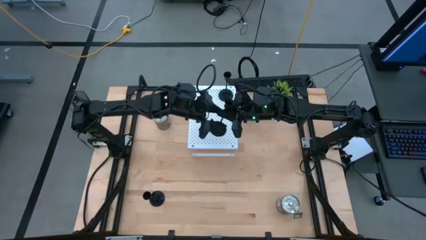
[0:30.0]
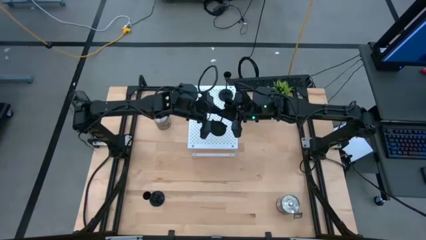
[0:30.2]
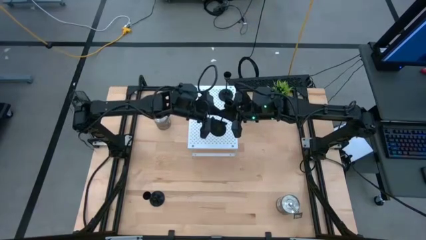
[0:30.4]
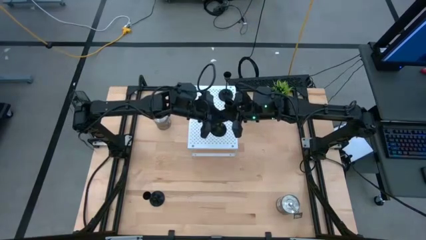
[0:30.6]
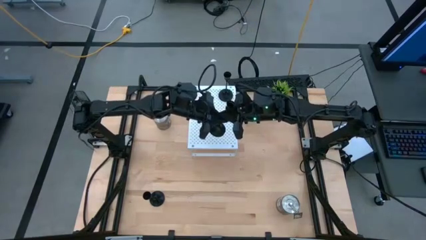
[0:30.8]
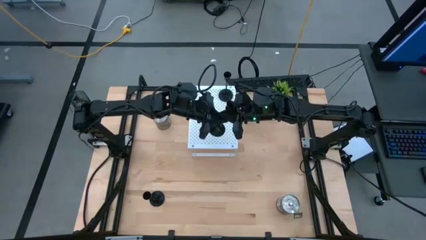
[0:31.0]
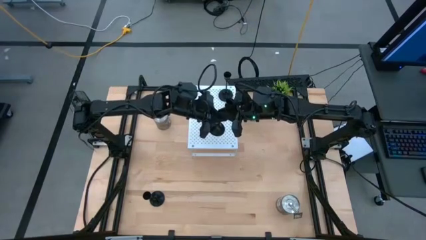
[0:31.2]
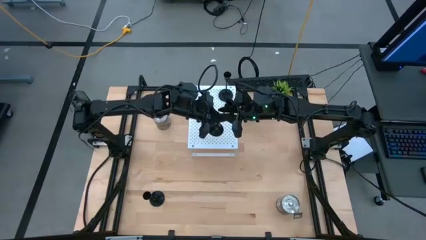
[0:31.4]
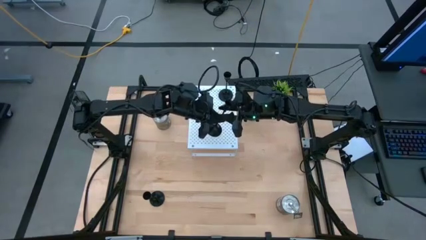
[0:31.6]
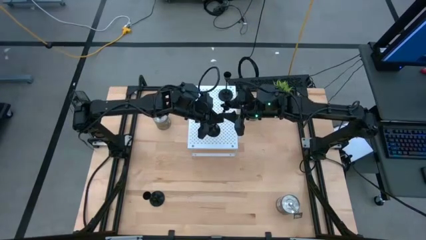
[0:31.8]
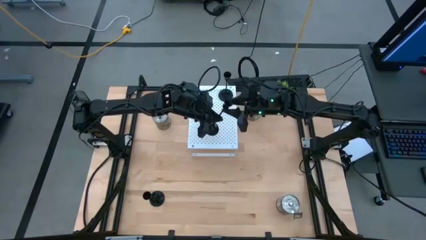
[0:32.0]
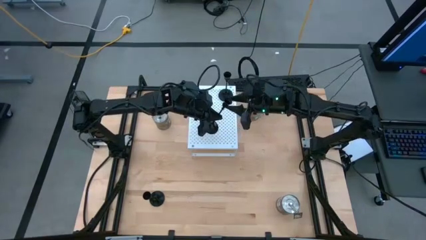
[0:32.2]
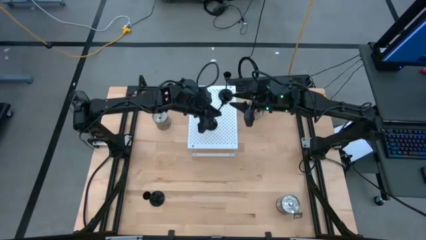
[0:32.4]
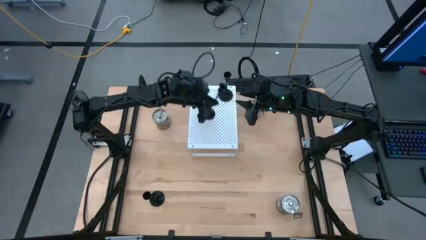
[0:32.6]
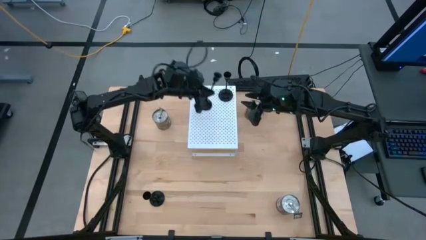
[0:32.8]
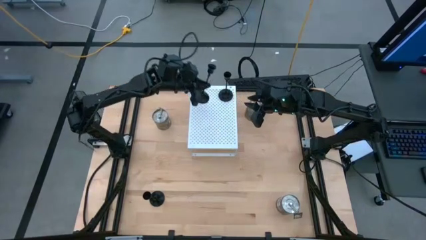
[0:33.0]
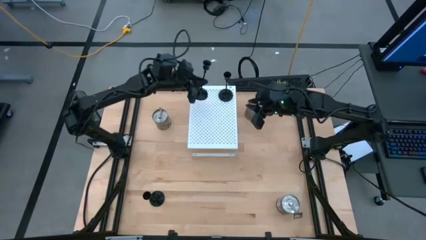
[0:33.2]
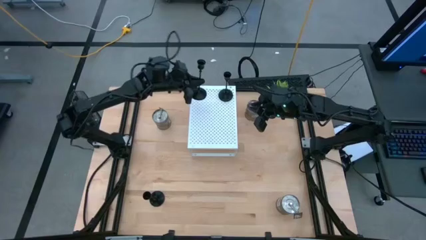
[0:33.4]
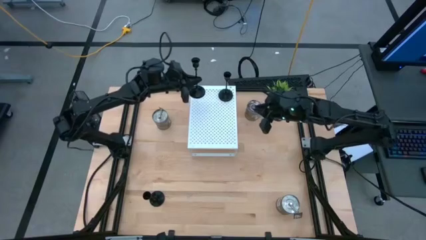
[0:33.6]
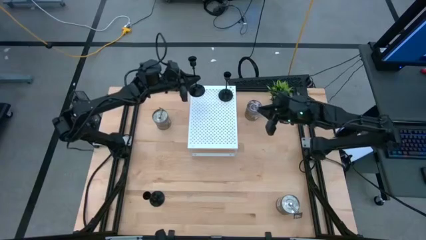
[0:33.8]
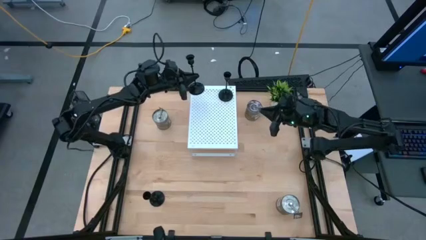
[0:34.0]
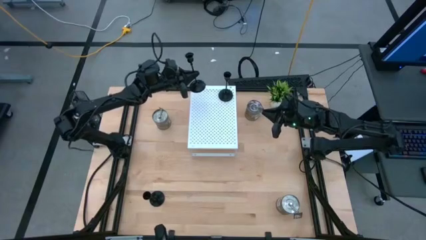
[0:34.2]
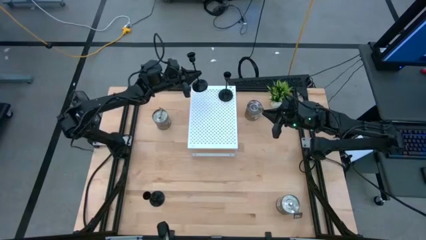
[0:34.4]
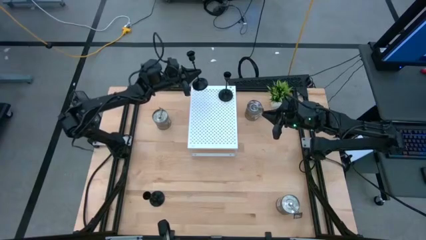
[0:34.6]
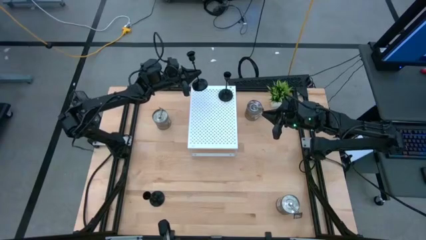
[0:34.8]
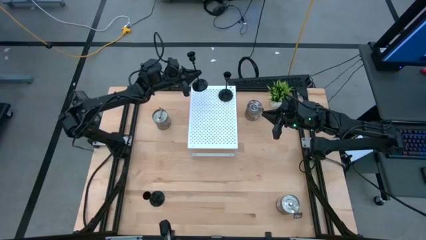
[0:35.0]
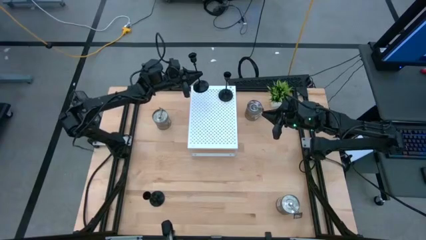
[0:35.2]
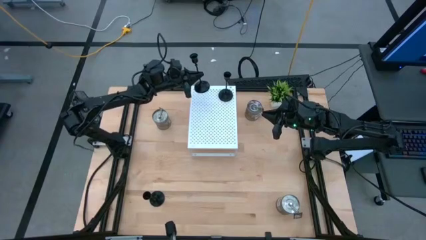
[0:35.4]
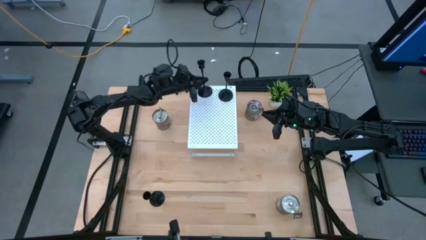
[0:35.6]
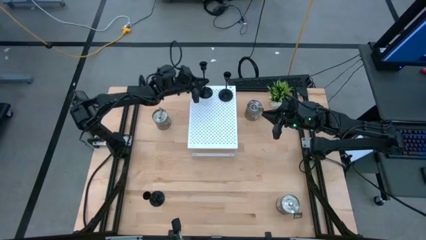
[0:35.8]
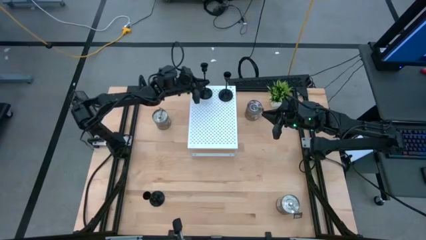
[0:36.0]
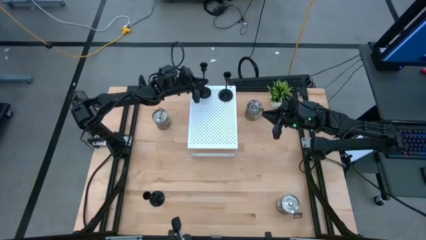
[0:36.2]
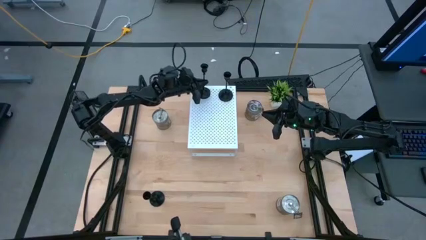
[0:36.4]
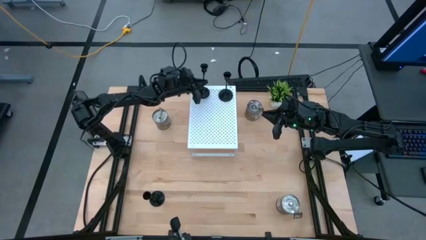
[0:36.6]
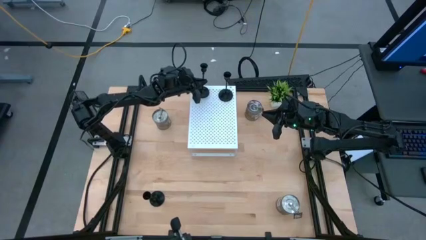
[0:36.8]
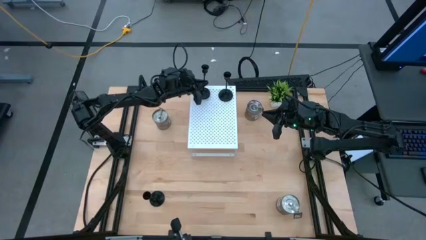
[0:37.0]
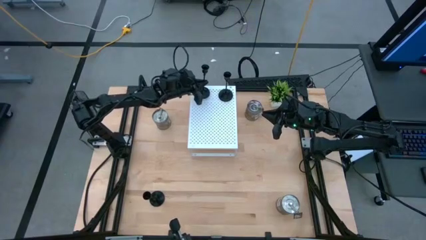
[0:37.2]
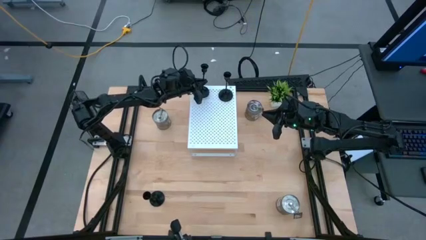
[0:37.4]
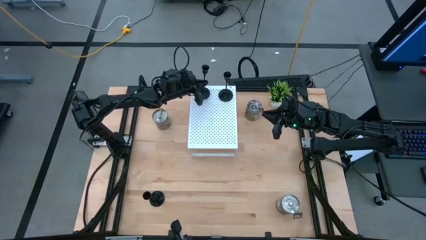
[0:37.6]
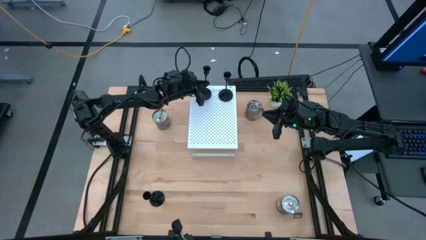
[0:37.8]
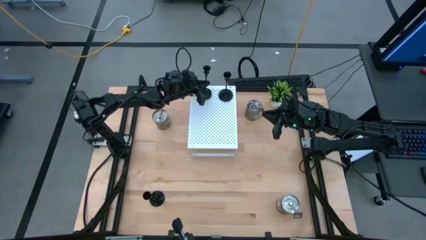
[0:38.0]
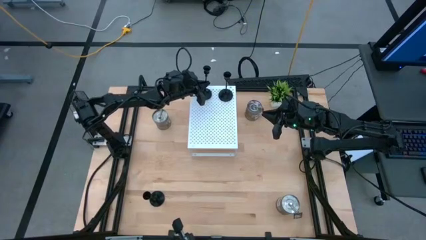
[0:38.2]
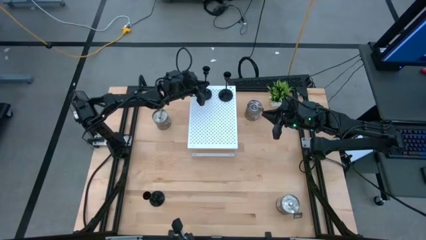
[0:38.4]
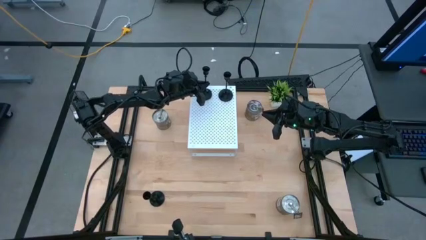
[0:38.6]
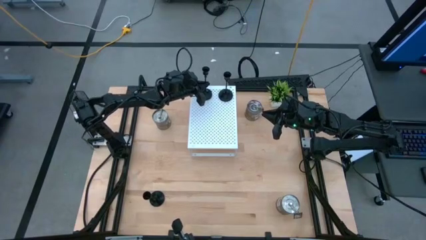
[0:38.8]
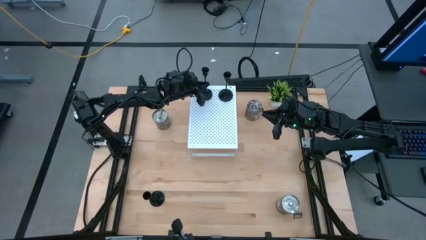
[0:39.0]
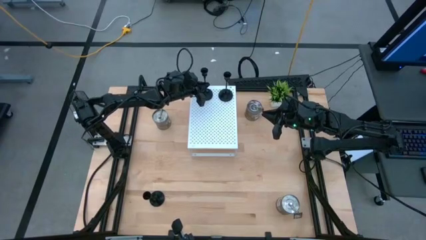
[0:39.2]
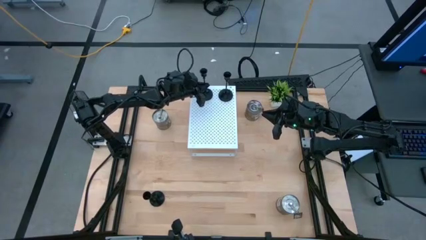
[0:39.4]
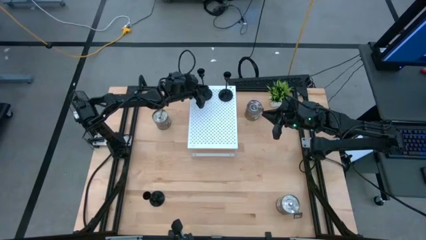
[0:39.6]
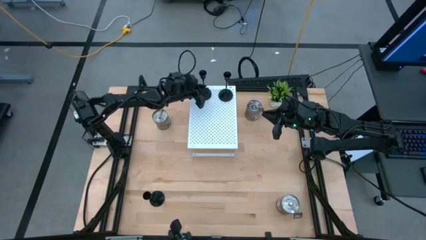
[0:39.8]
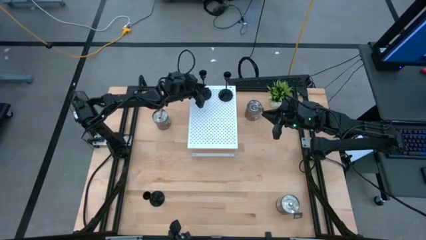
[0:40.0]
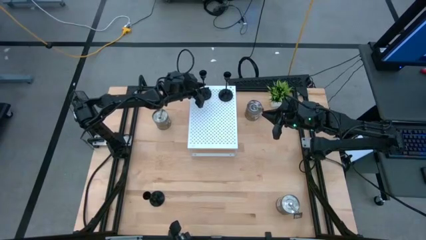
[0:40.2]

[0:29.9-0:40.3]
Task: Pick & Place candle stick holders
Put the right black candle holder on the shelf
